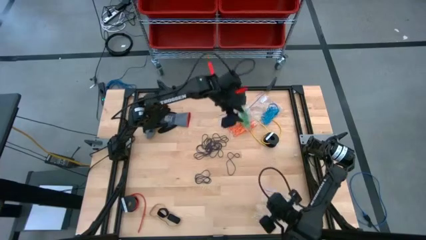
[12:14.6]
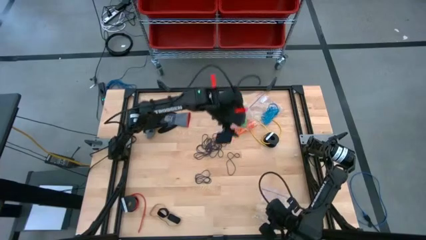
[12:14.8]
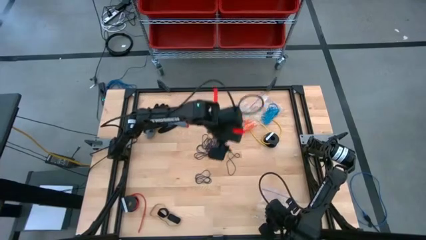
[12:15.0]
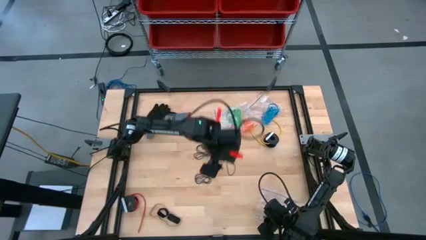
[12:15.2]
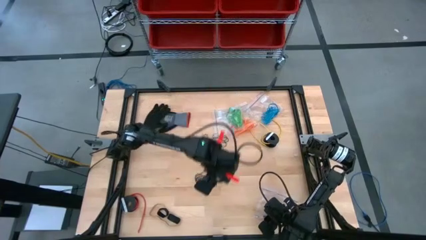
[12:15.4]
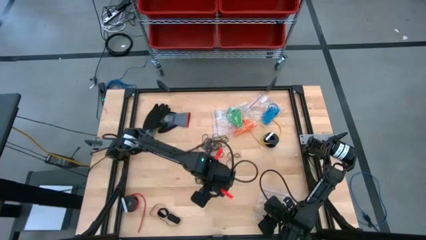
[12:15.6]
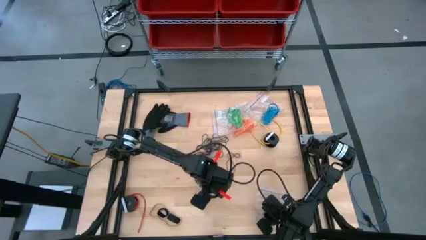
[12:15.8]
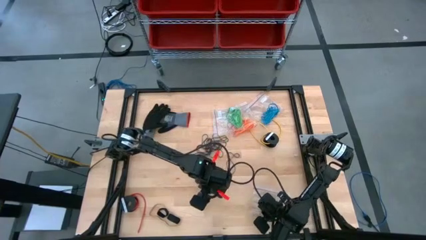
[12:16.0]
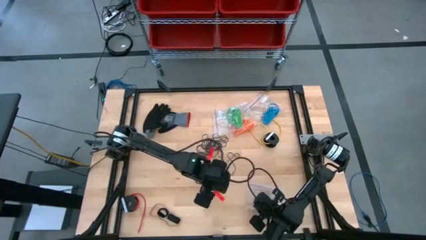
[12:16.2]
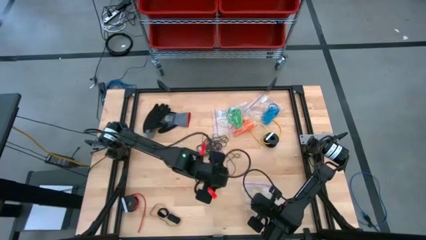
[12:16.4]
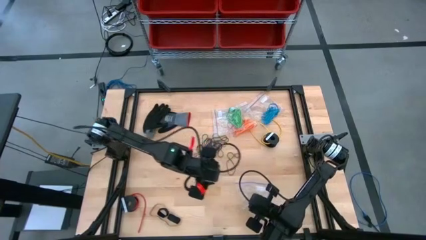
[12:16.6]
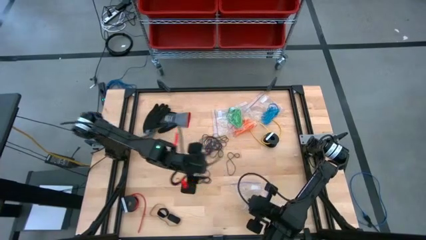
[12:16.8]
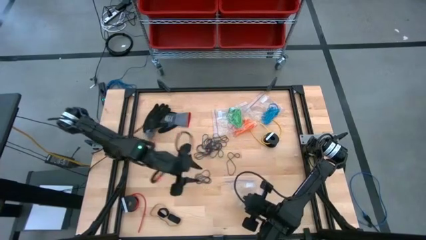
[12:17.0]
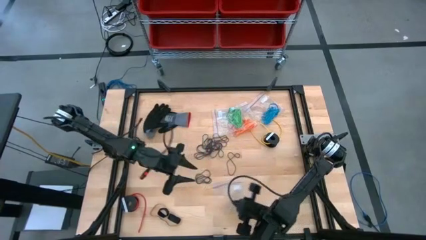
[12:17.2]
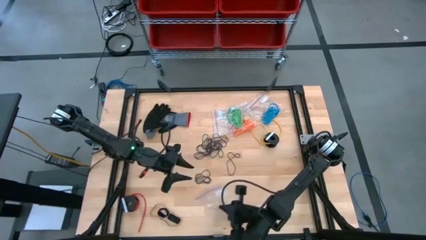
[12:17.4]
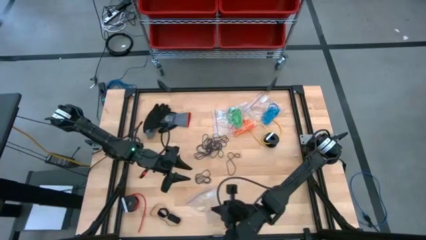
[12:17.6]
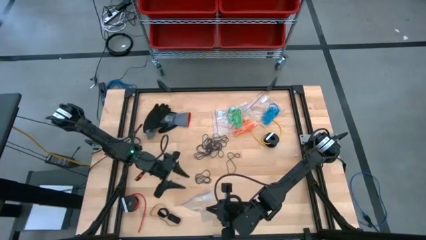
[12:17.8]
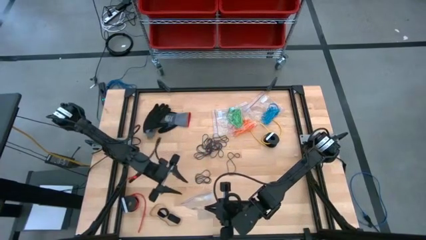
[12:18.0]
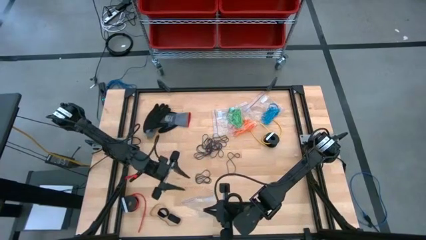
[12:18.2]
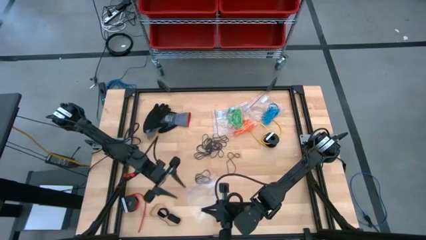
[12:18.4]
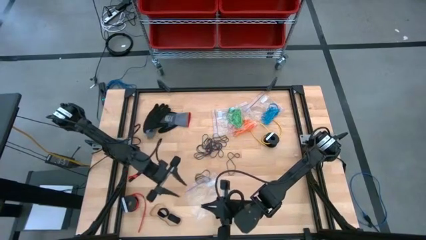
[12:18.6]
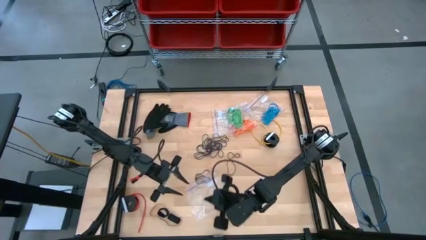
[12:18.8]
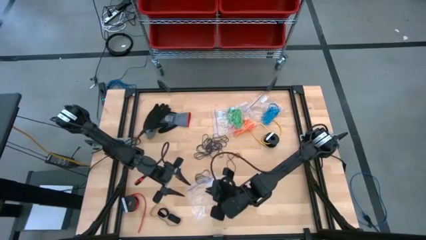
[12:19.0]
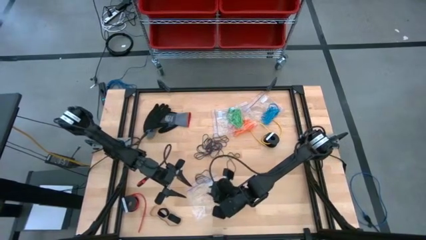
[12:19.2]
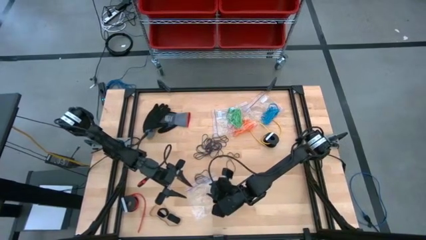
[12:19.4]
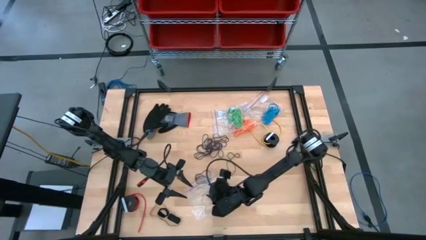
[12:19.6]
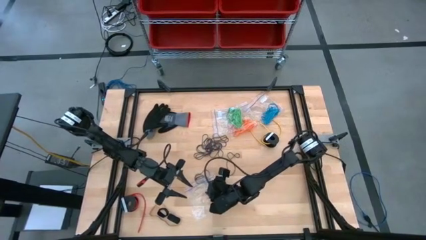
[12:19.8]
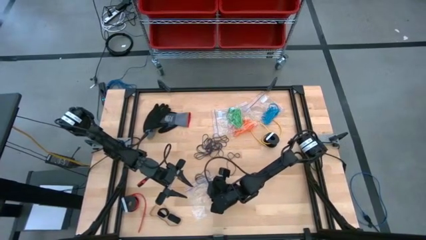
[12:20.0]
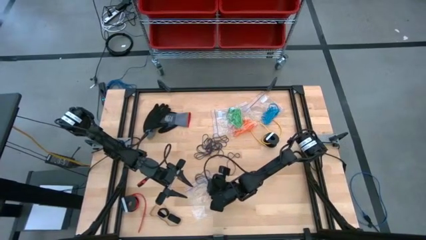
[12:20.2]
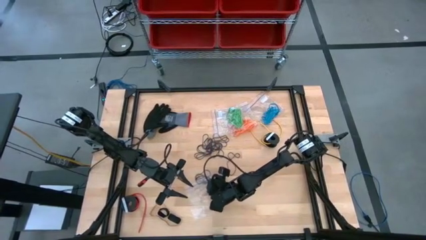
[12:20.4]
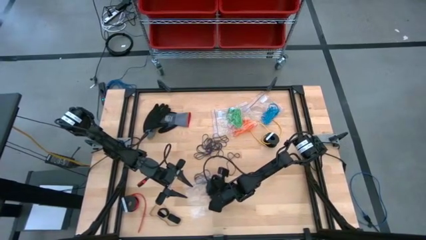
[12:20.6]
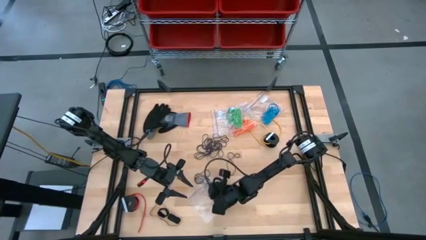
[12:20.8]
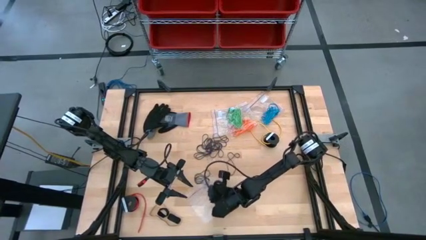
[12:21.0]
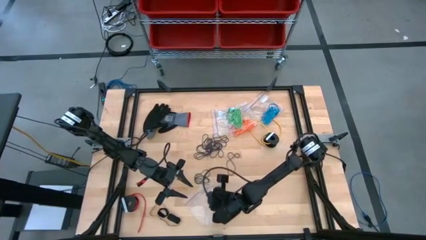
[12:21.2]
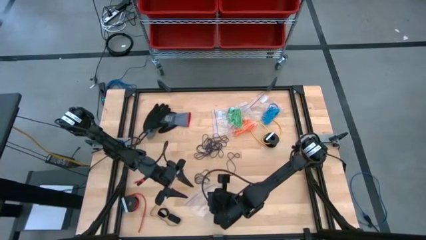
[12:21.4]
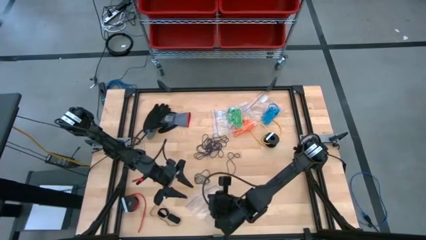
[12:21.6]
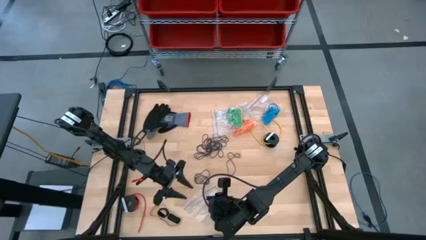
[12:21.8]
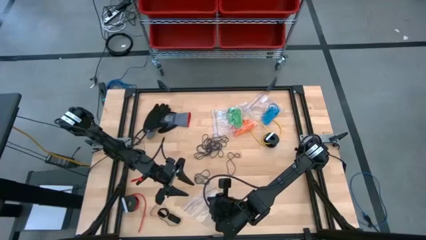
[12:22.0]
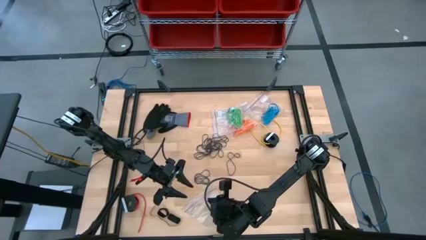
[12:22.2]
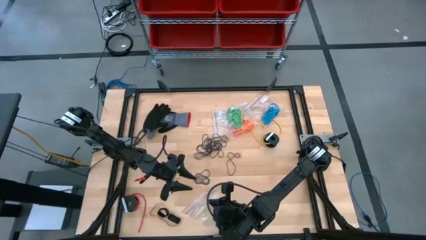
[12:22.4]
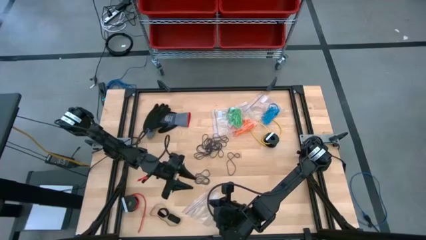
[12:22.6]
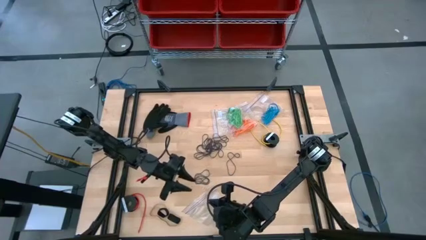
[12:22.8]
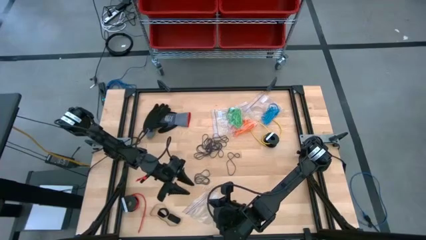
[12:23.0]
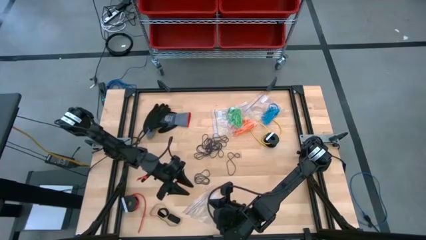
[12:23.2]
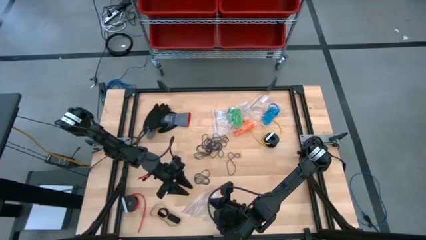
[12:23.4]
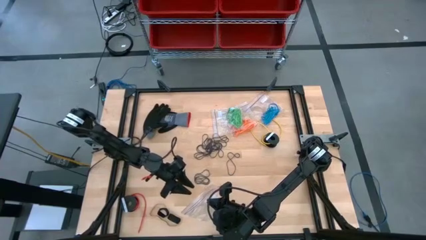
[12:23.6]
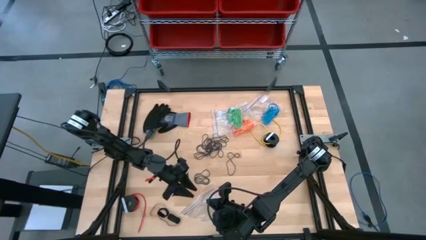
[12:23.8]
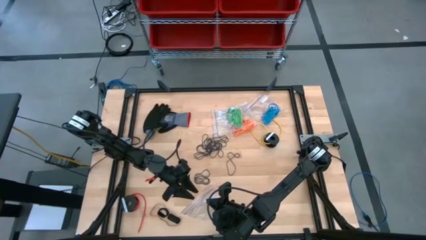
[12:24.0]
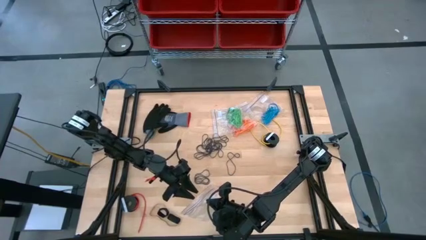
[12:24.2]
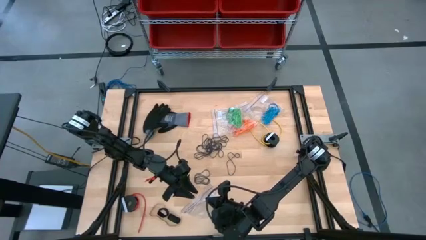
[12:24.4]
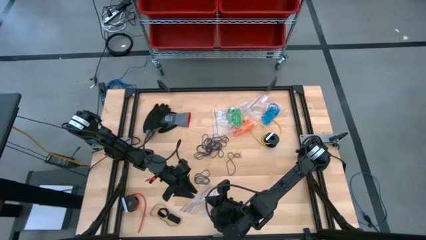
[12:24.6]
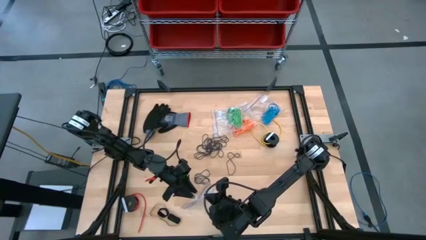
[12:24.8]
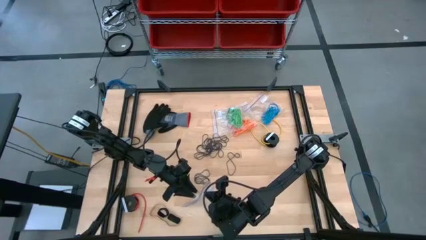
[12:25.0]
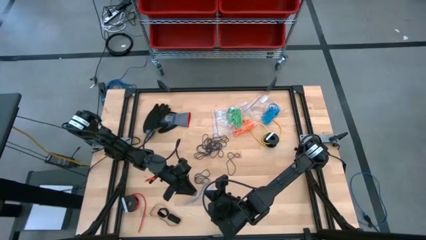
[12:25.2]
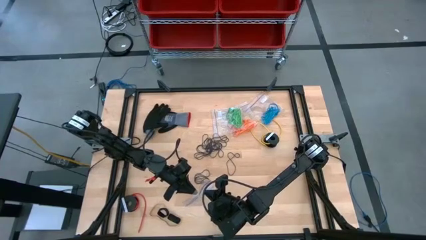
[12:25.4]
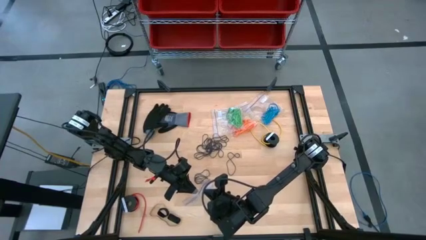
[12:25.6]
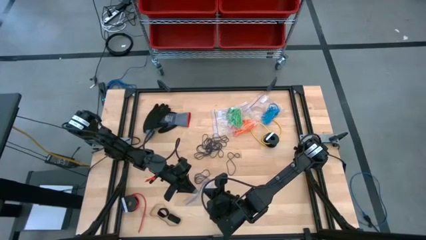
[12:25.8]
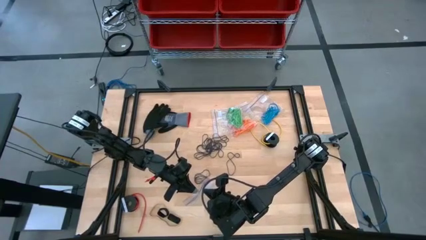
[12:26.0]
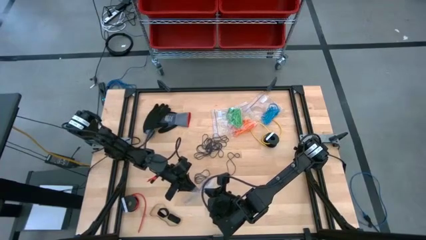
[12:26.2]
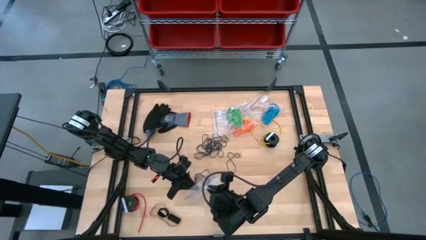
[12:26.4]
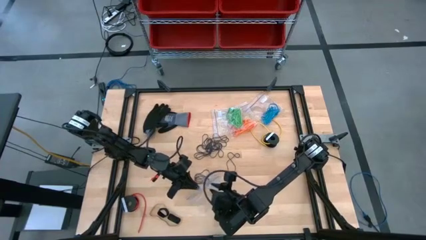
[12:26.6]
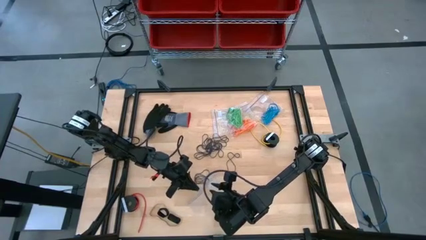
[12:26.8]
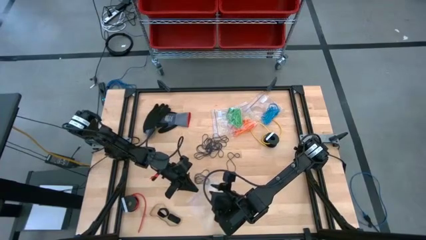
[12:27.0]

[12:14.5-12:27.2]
Task: Sort rubber bands
Open the transparent zip bag
